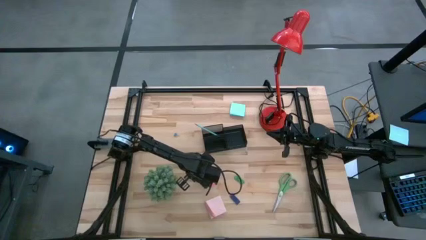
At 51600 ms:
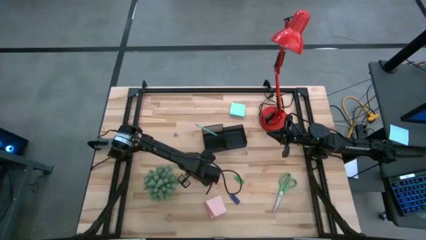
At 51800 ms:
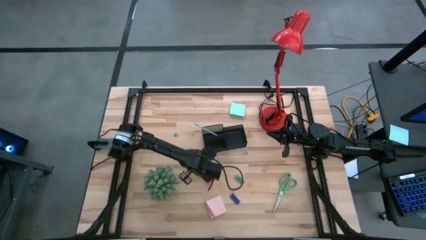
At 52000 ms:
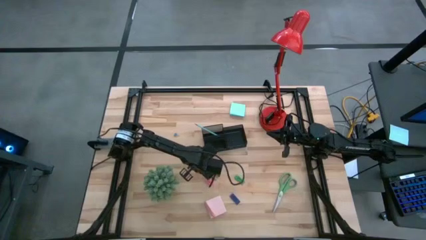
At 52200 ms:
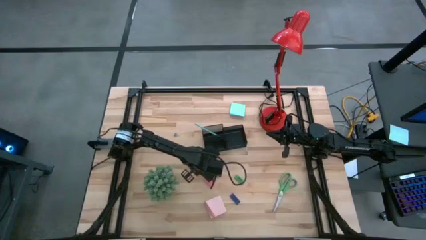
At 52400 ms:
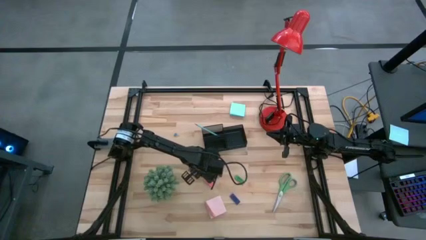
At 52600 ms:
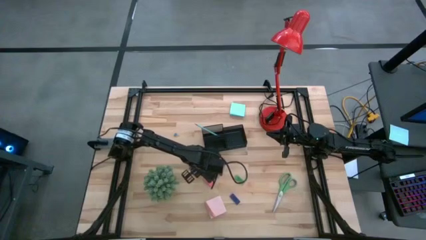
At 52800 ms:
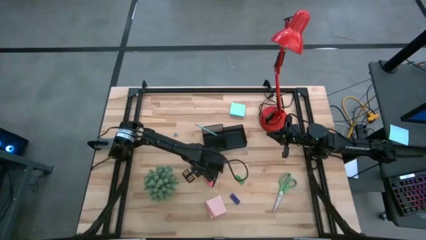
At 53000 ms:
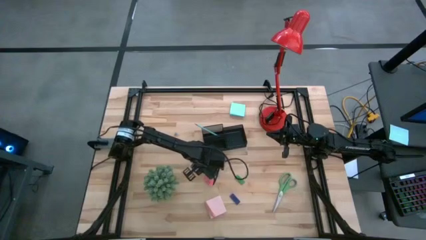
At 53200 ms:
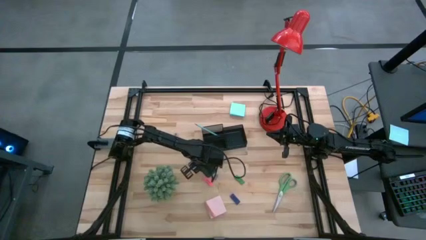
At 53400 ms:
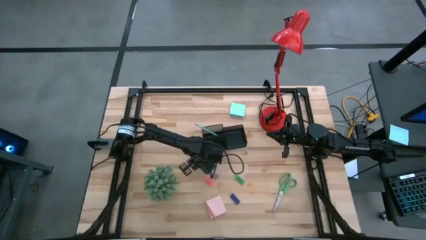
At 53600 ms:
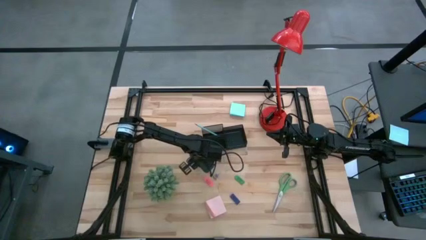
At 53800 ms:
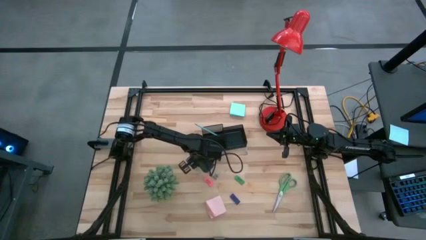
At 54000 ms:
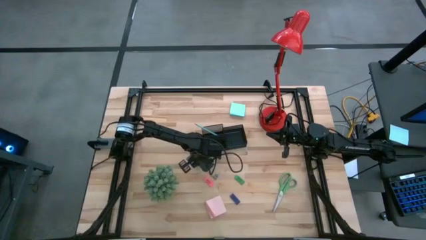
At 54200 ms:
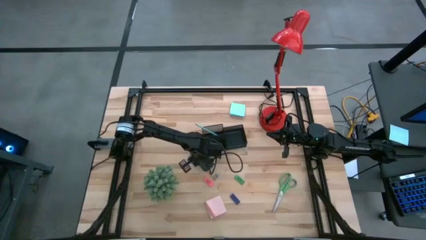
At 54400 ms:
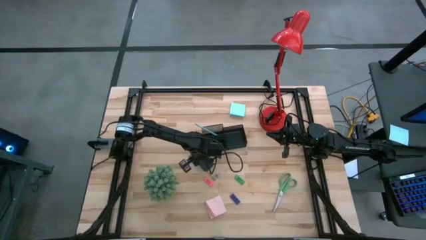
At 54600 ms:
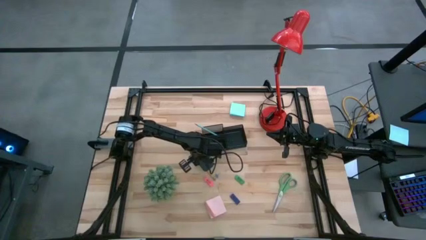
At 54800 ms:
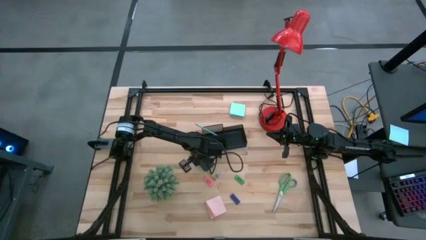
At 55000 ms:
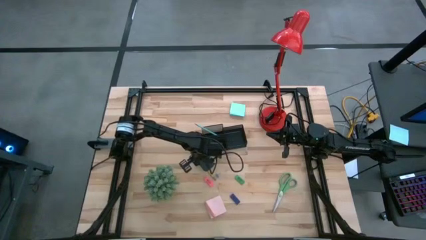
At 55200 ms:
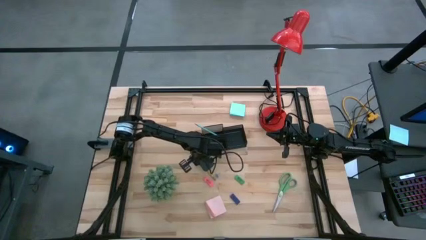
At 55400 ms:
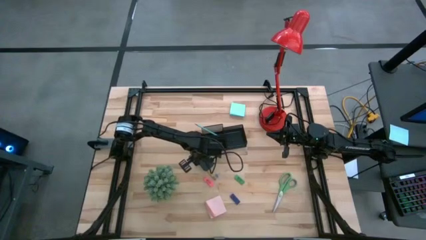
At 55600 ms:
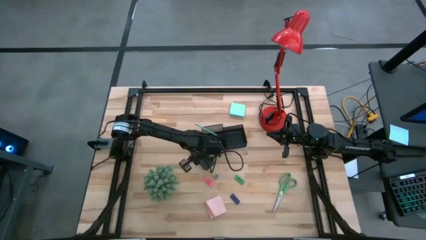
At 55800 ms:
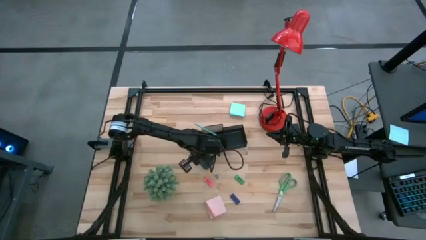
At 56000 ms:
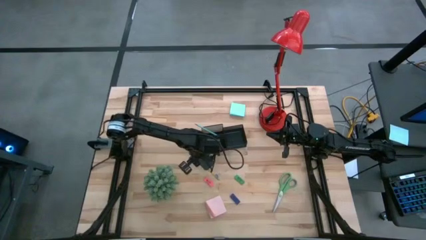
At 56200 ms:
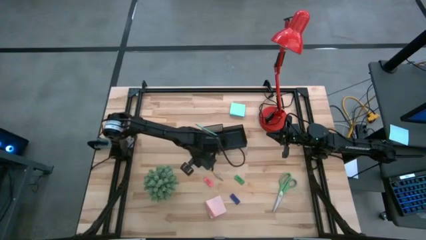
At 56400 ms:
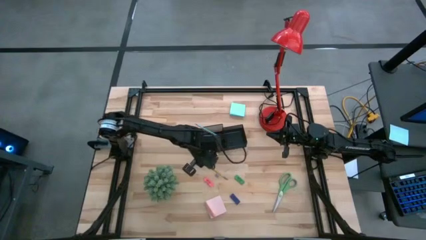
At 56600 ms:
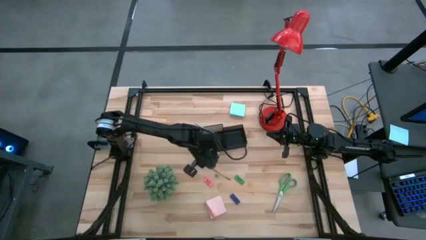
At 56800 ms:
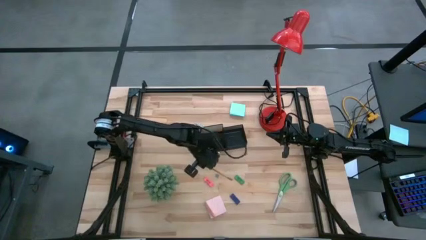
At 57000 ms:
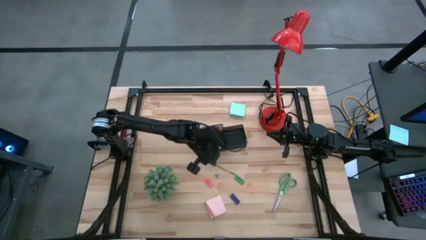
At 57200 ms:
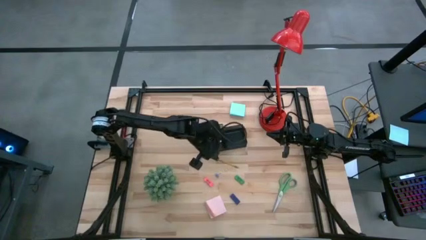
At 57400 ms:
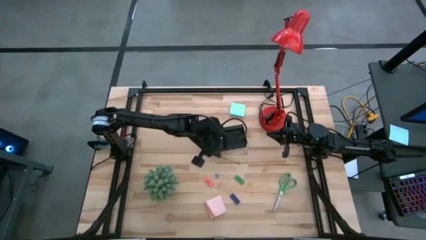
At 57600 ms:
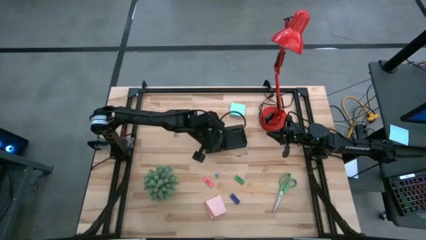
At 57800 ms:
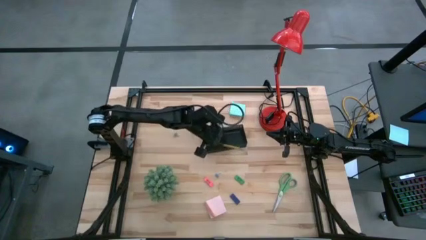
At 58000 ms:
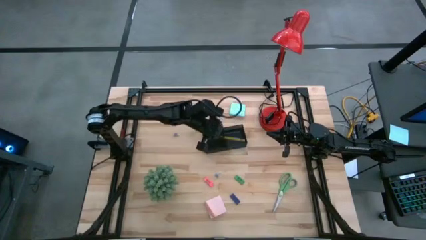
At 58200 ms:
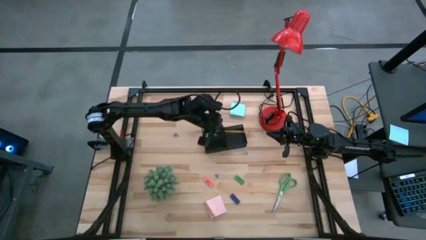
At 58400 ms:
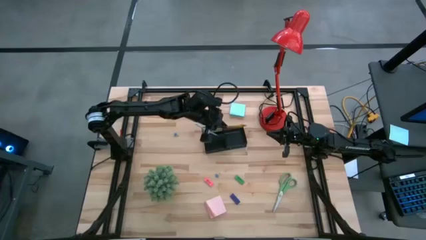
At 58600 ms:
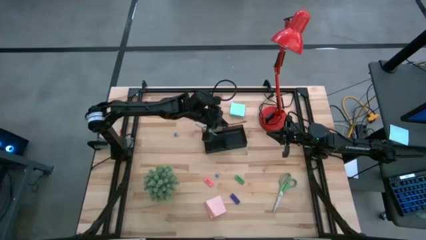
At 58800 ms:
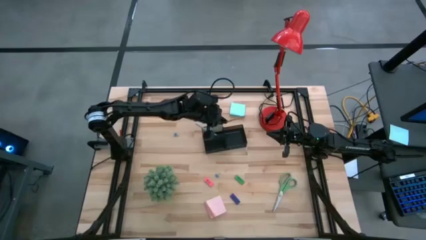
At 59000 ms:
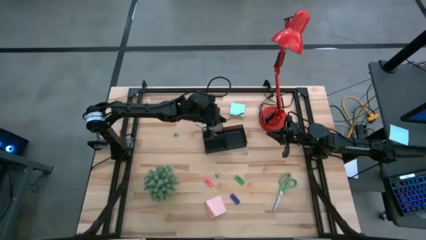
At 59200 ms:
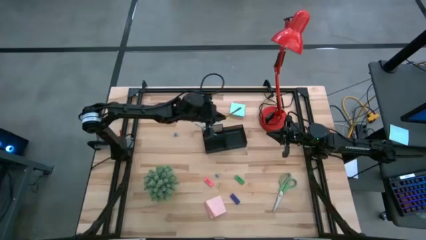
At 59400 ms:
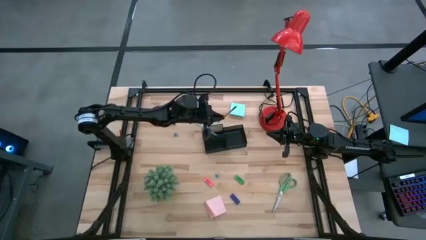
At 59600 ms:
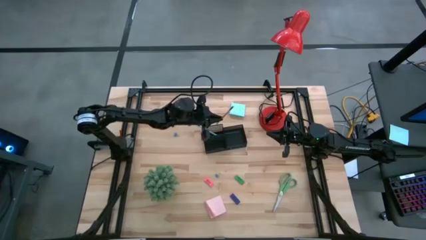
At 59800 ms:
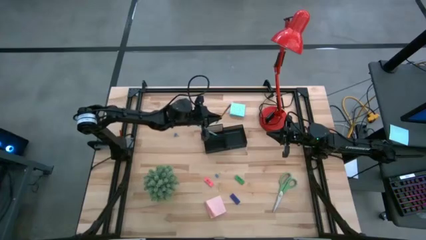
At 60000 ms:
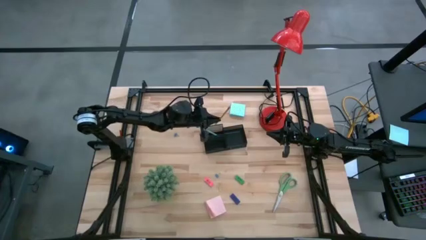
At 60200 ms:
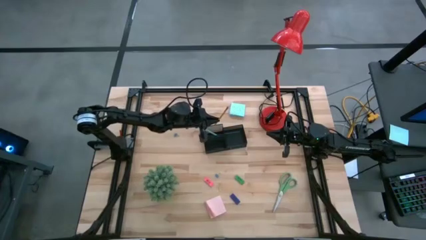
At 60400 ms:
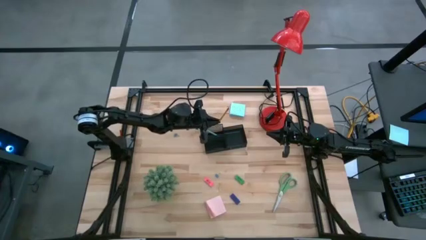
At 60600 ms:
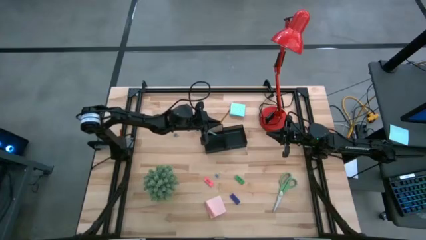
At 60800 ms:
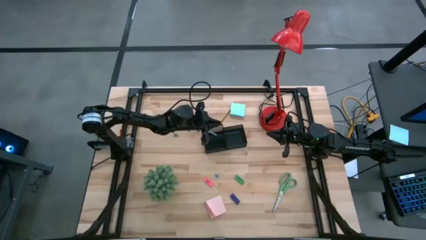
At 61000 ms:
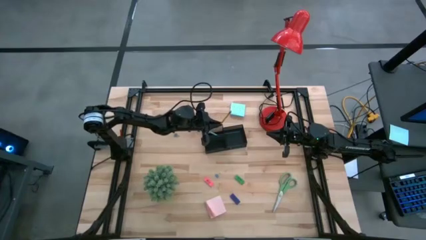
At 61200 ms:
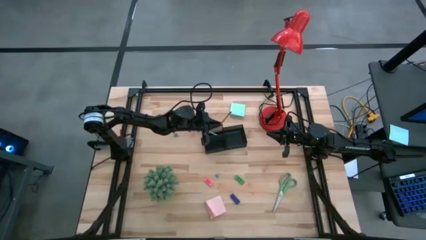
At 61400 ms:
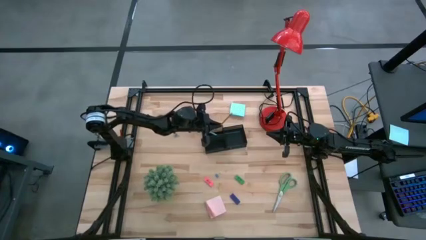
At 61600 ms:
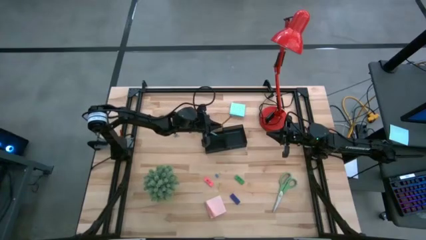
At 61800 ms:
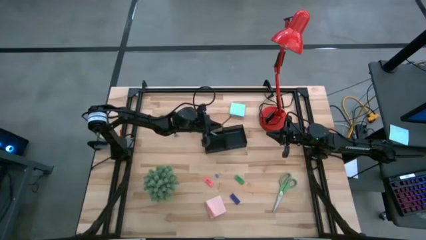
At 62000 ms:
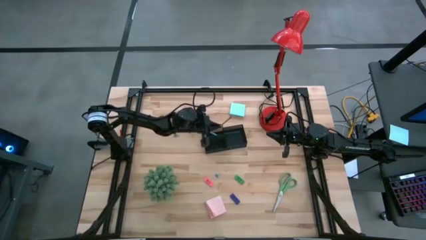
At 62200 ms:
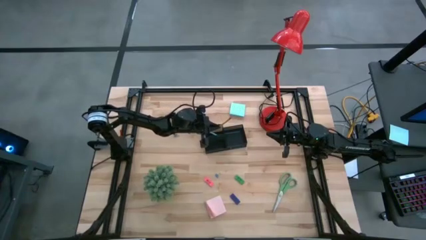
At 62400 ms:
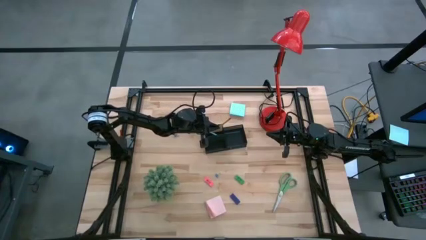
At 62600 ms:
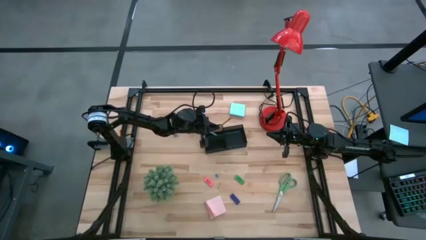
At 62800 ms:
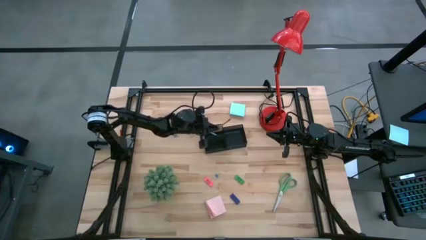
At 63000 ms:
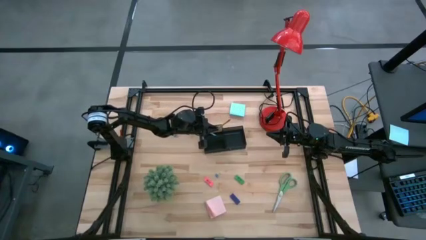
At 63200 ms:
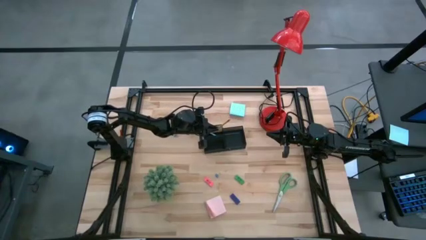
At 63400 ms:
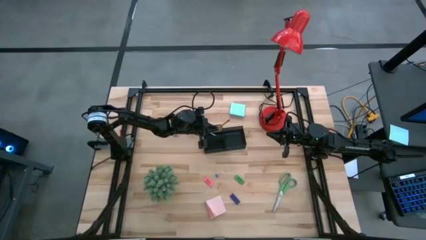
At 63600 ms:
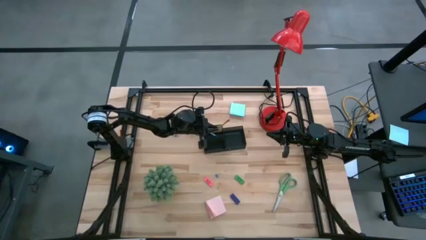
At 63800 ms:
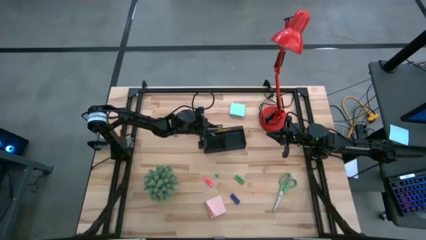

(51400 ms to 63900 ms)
Task: Pick and place office supplies into organizer
Put the yellow pencil into the black desk organizer

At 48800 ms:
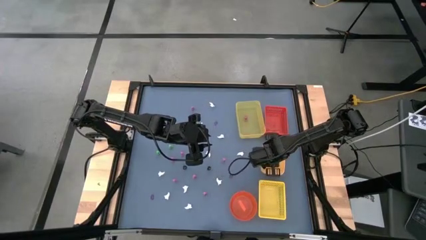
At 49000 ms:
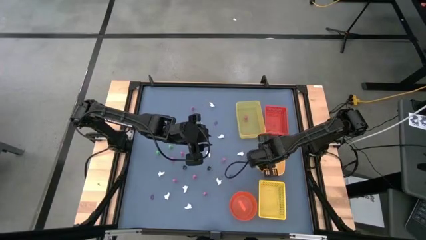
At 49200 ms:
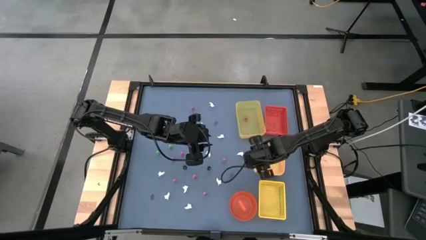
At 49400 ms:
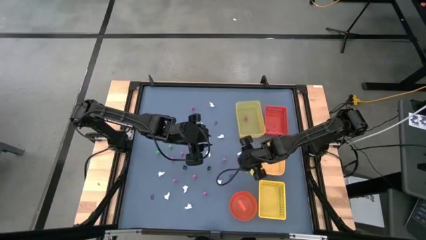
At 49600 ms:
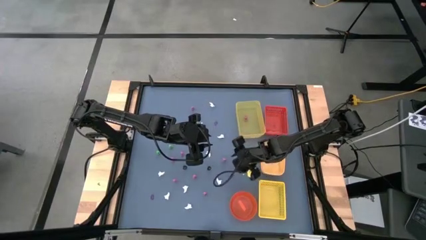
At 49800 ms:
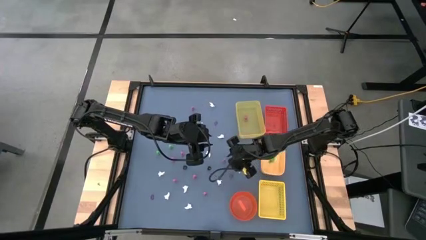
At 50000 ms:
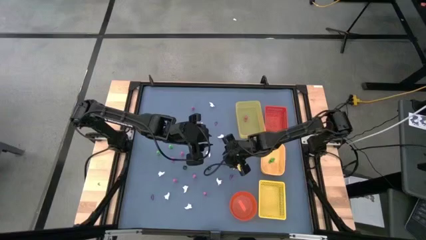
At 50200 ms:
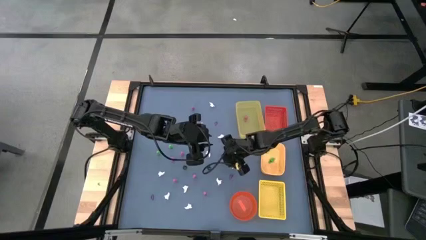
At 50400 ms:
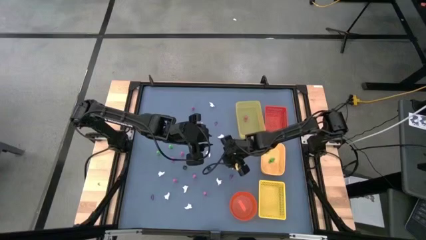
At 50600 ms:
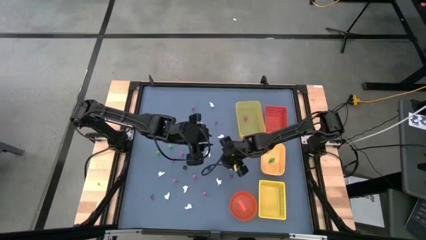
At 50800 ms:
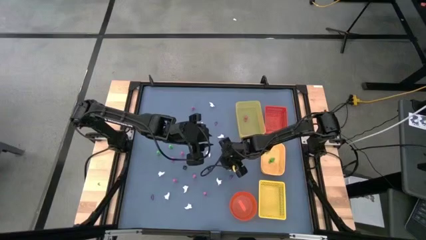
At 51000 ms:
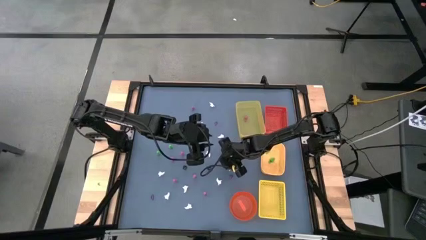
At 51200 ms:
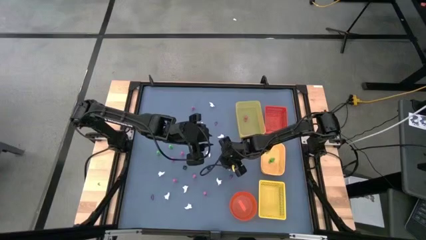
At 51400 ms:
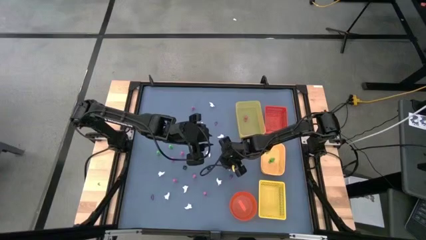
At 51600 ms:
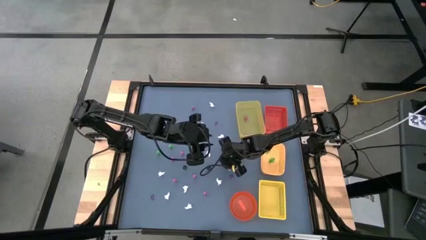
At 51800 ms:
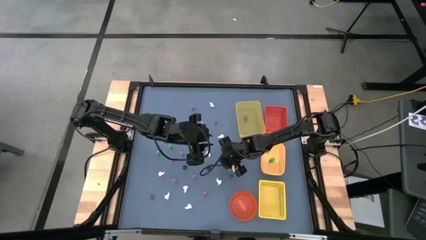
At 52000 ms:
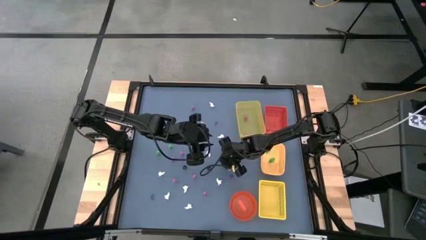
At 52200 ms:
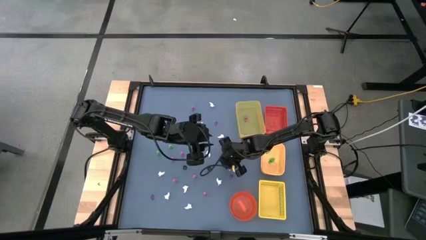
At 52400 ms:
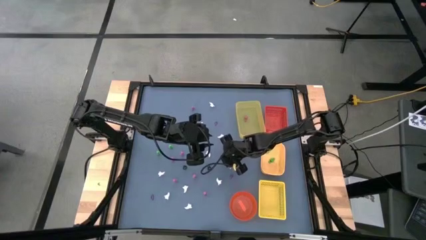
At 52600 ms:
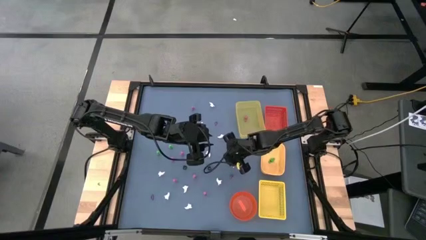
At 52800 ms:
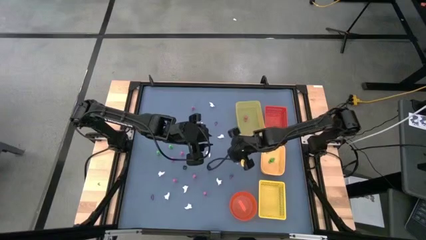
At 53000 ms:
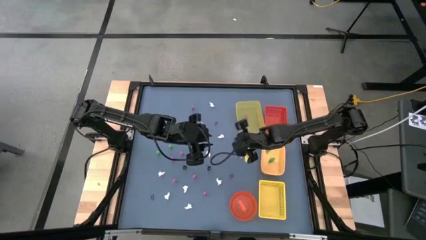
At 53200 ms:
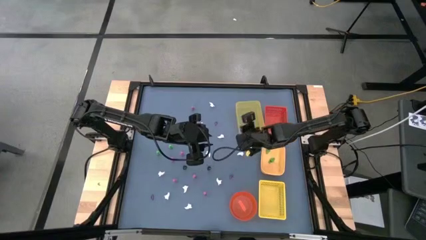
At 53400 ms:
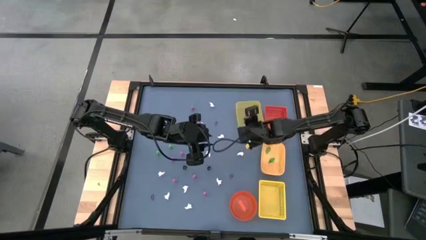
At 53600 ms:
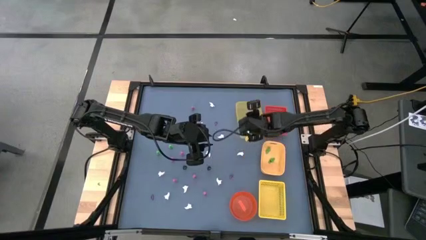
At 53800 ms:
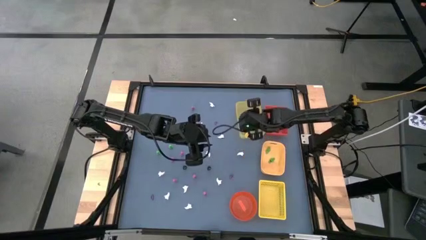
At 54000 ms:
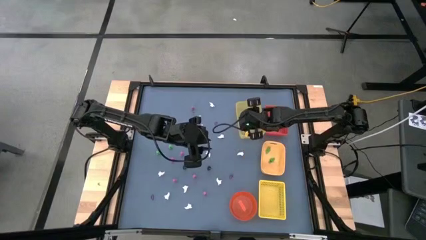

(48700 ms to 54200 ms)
Task: Sort Halloween decoration
Put the pink skeleton toy into the top yellow bin
